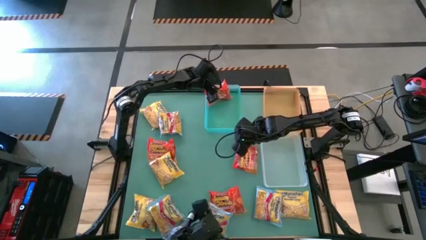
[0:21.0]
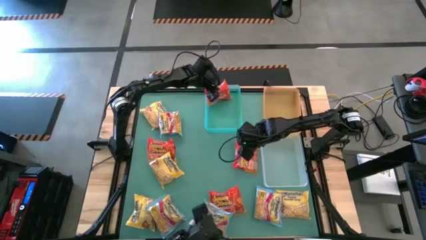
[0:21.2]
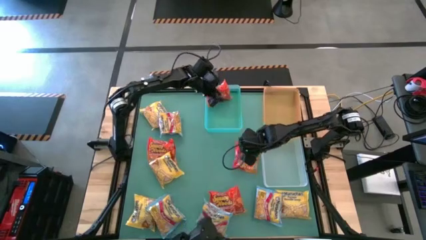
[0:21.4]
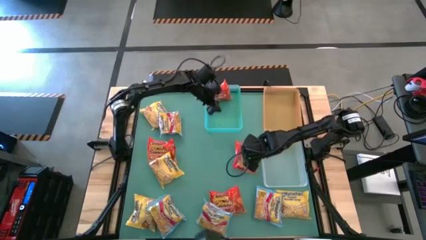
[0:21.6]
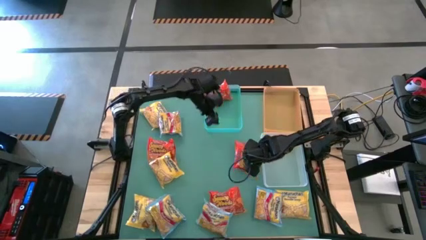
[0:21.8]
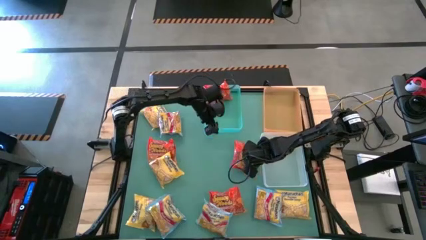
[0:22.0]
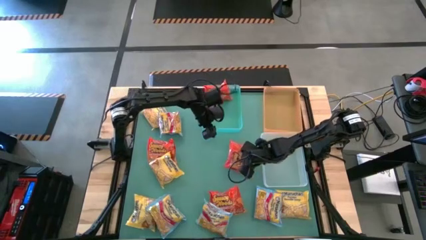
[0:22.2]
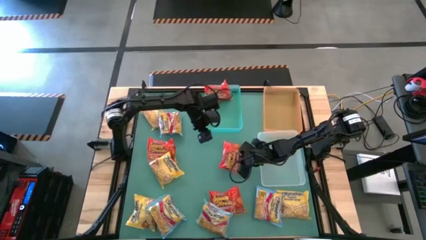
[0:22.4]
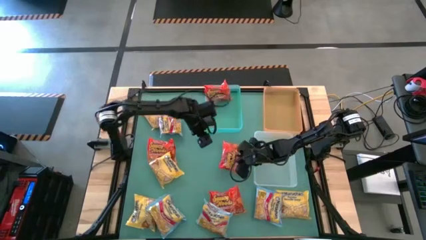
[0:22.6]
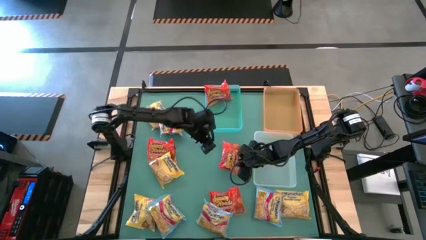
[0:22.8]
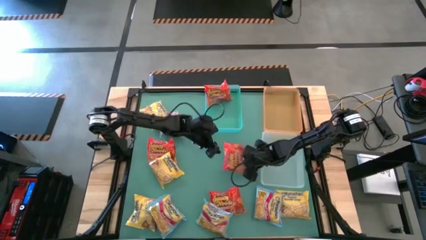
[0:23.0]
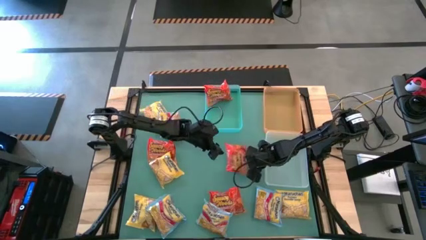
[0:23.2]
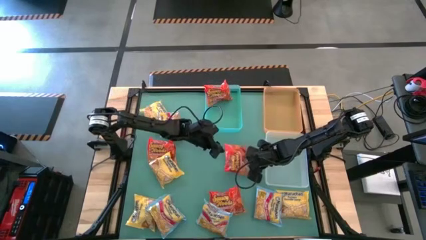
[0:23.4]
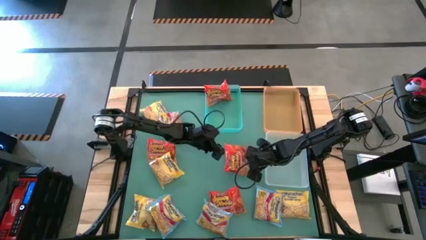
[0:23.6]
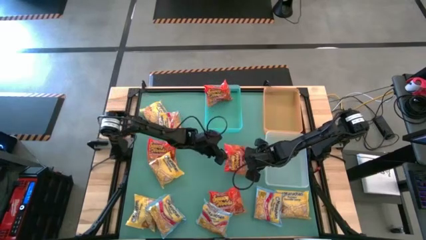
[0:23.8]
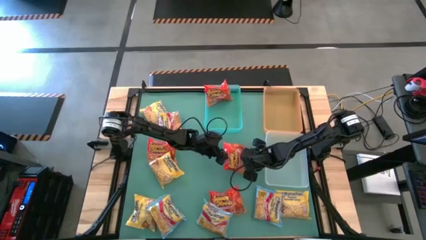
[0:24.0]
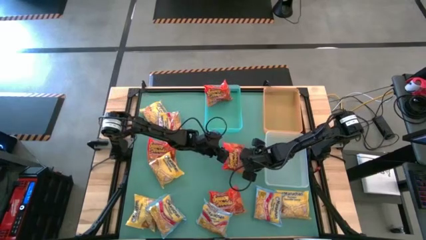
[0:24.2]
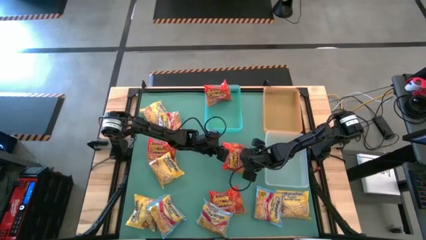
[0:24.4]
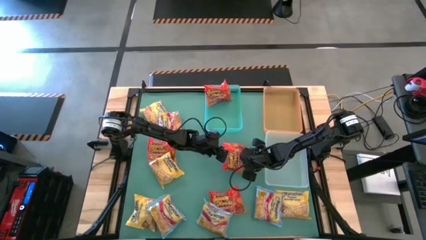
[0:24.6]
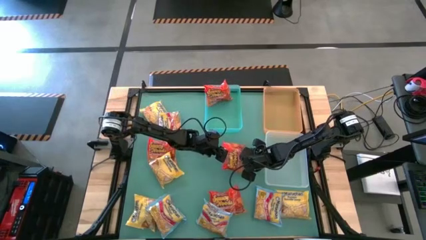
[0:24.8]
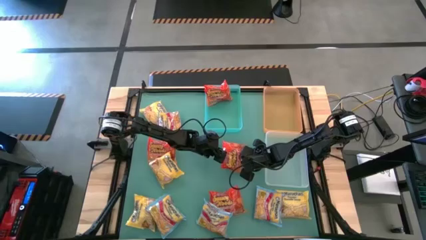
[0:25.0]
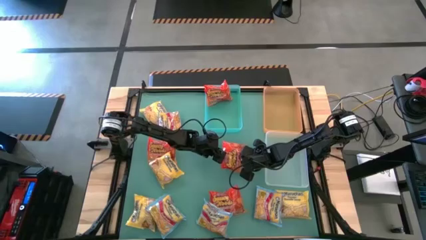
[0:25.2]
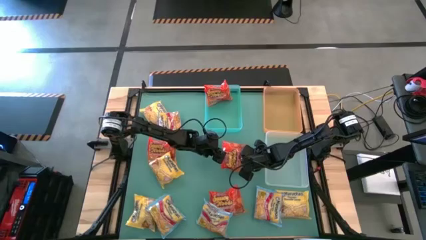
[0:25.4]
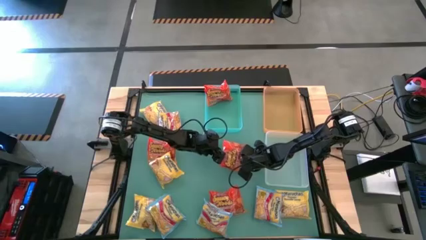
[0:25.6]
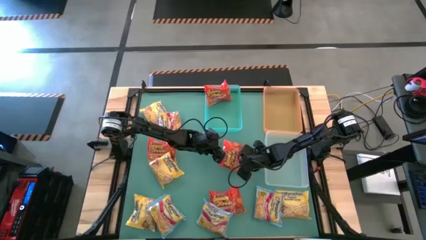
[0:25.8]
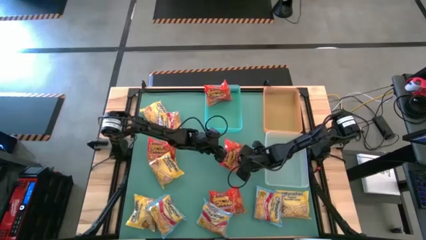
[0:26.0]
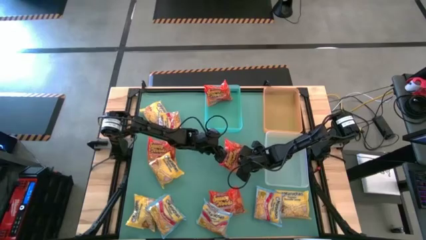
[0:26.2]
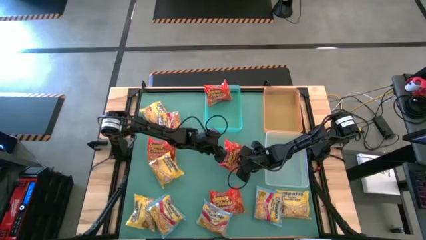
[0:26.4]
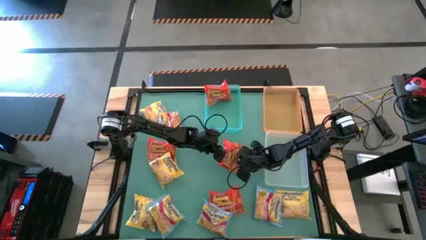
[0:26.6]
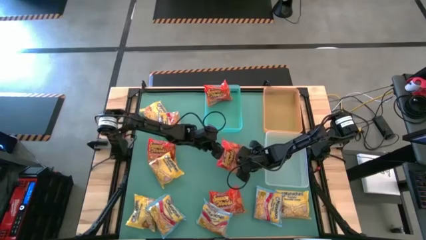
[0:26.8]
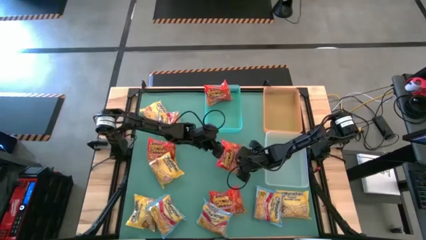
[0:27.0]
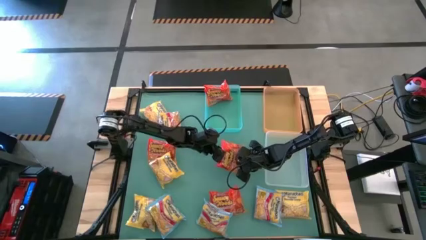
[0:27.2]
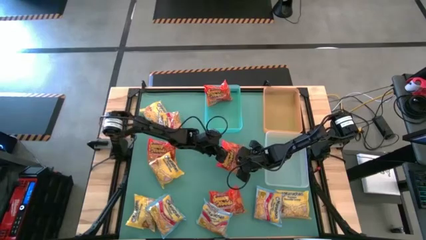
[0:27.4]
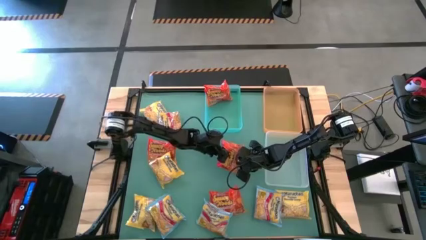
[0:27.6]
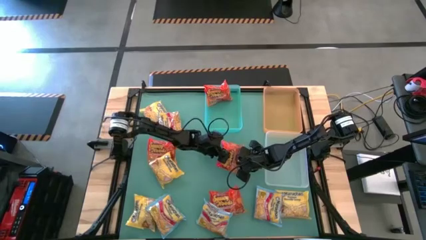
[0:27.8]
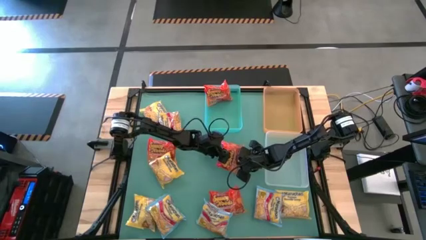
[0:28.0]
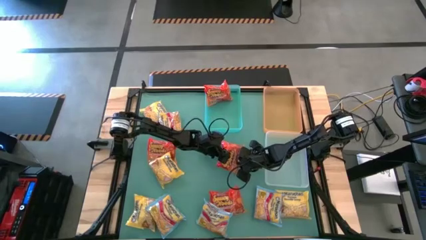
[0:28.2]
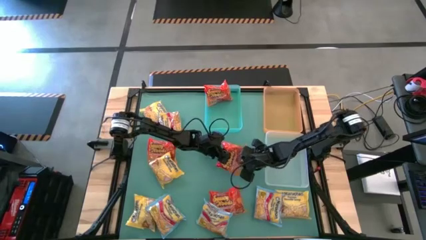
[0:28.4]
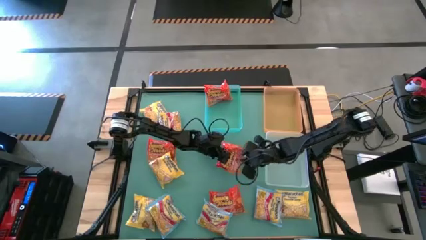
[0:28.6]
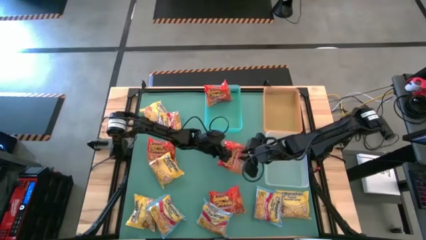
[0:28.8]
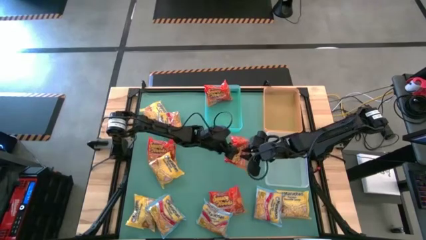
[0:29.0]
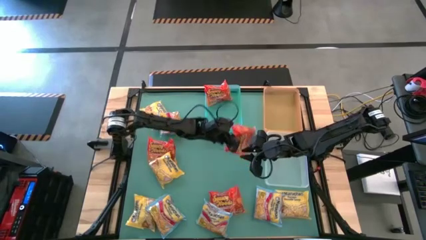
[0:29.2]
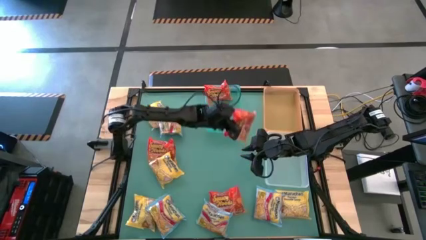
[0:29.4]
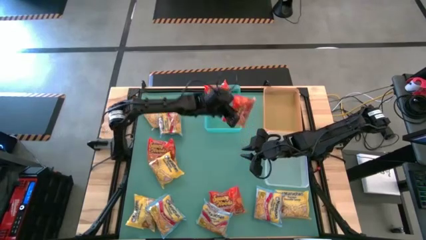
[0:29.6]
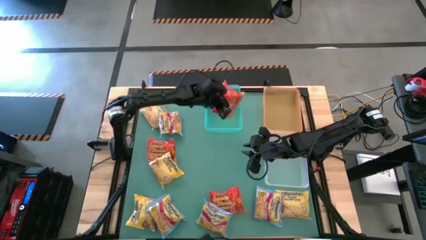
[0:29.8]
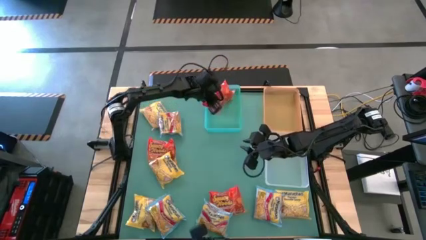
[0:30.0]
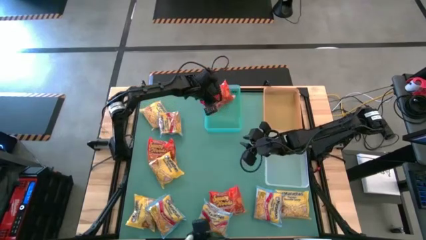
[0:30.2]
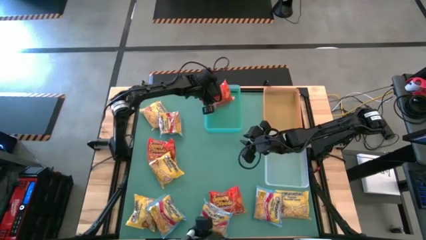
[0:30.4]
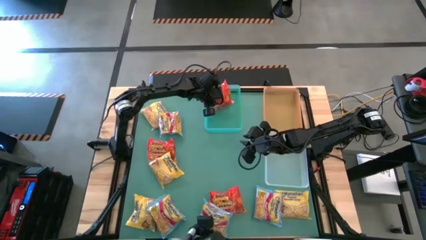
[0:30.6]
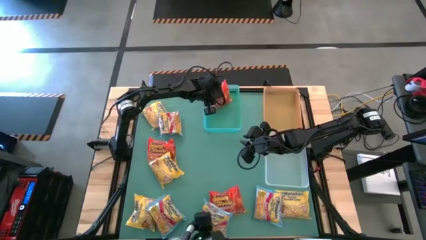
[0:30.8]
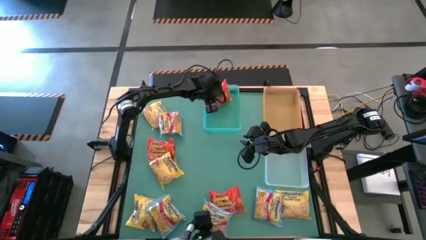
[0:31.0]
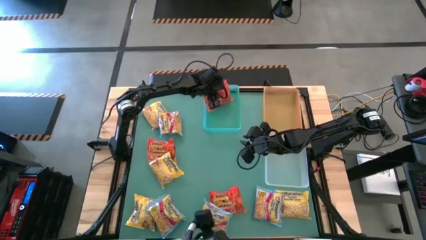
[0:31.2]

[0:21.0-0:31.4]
Task: Sort Maruchan noodles
Put the orange noodle pack into the green bin
